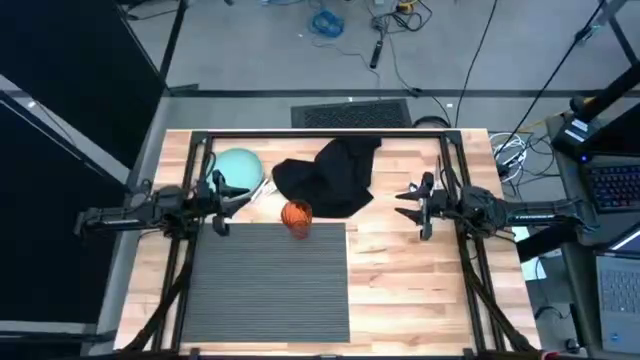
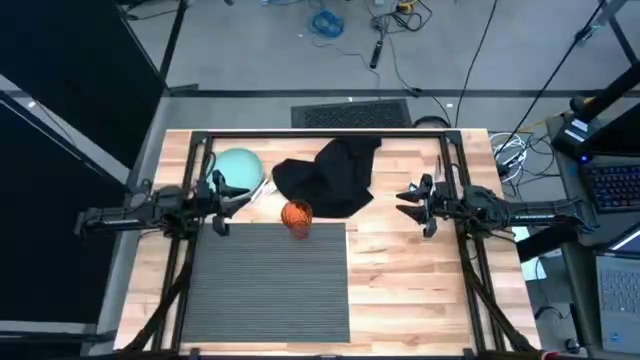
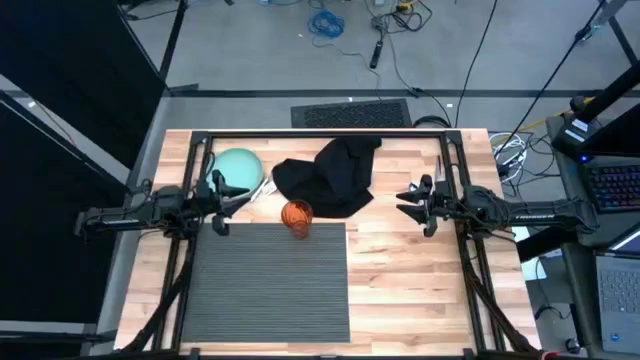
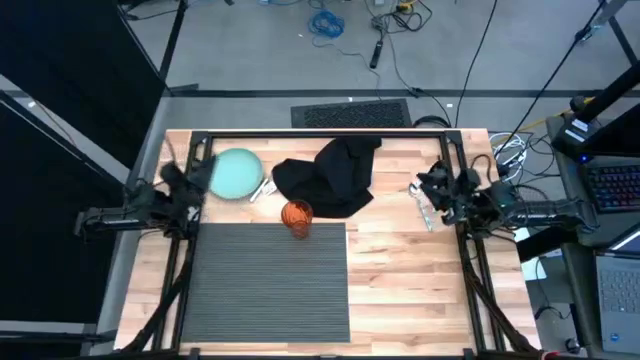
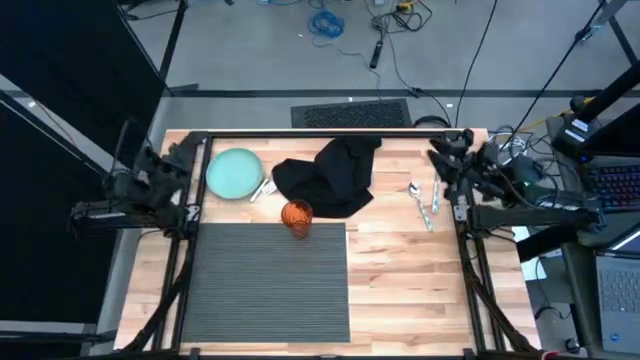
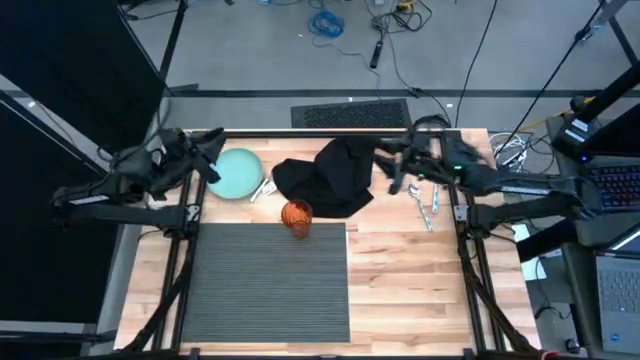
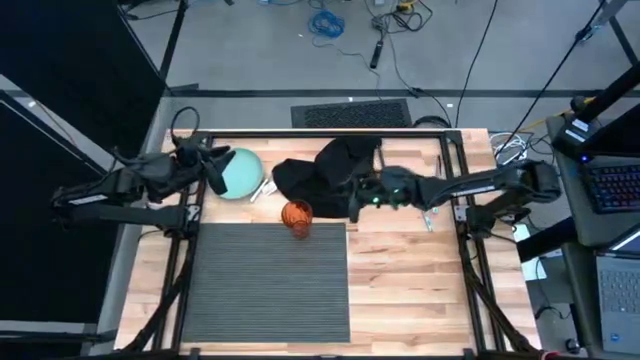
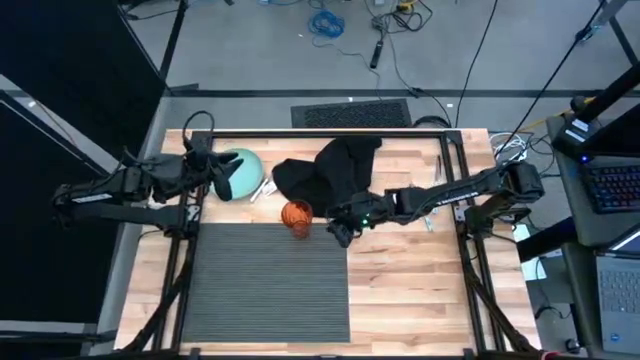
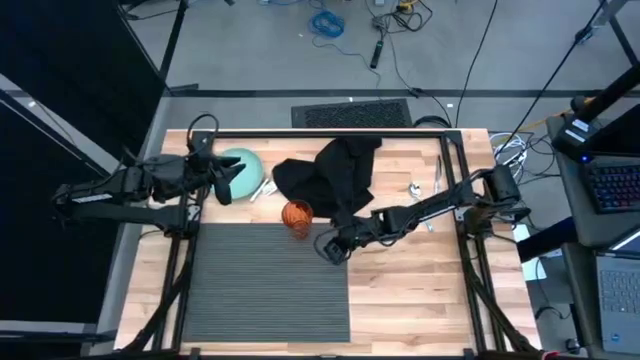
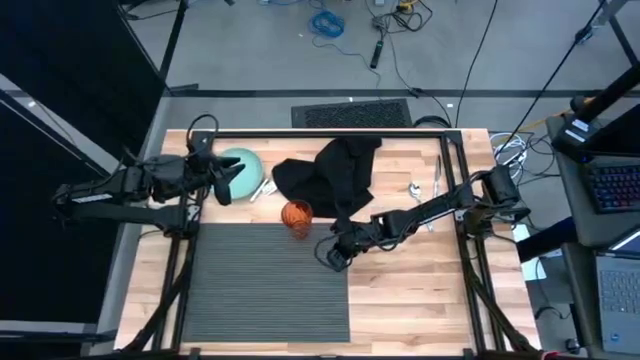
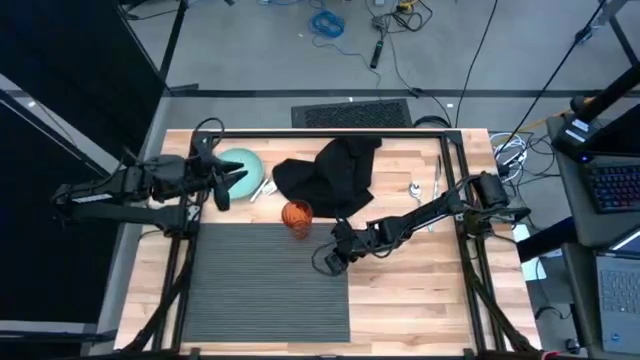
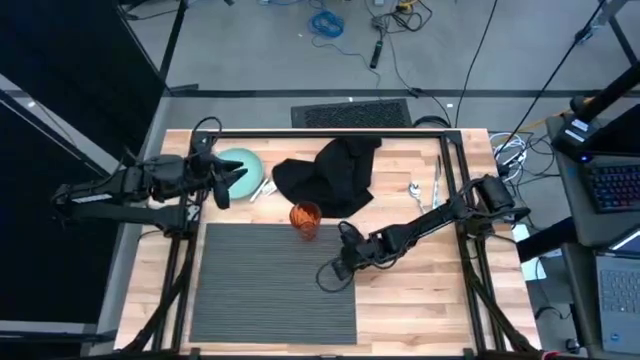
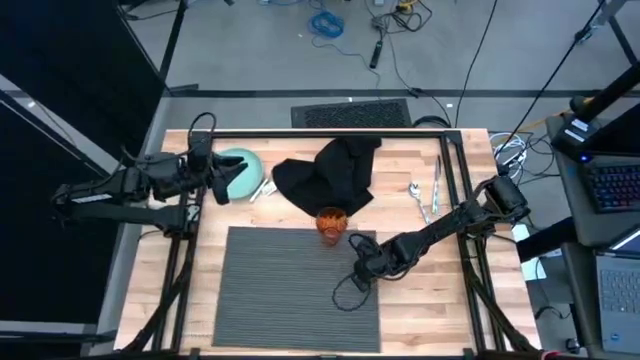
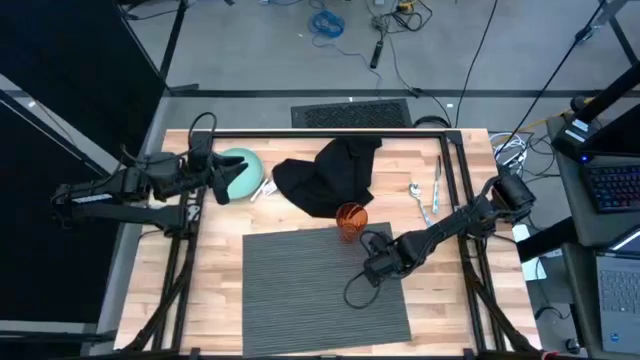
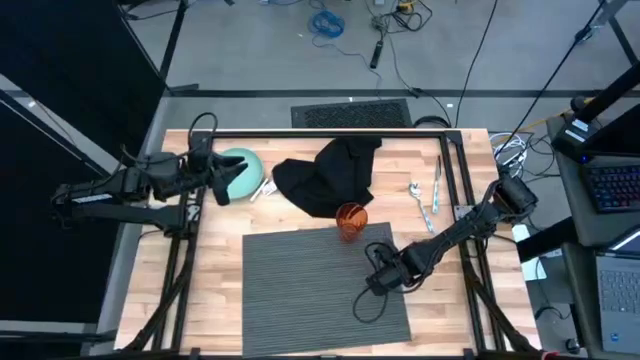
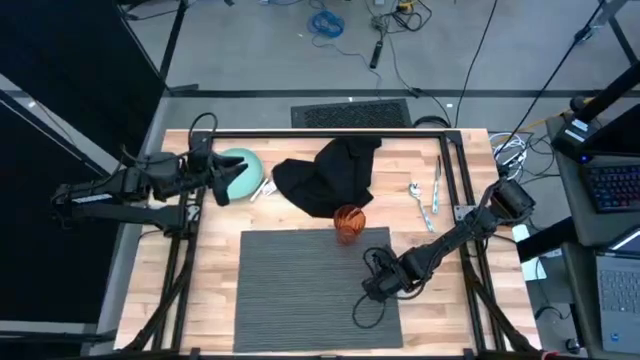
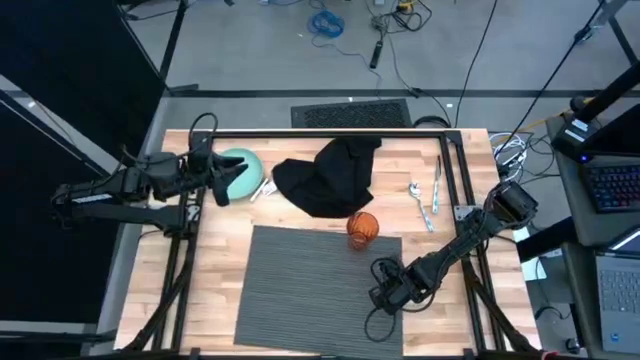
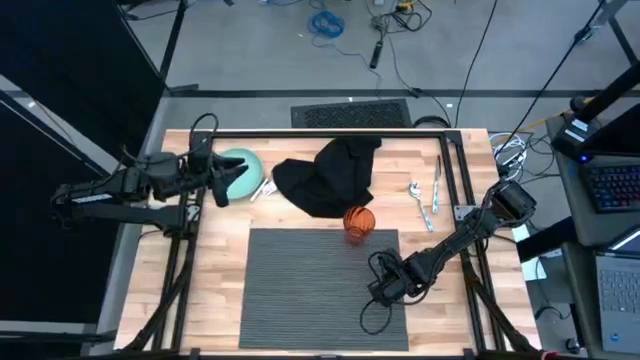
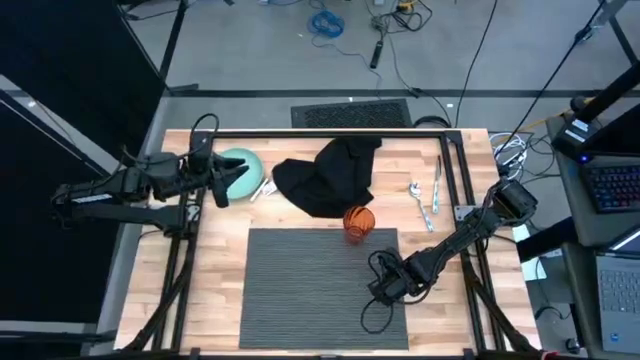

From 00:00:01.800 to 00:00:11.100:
Task: Set table place
Move the gray mat to the center of the table

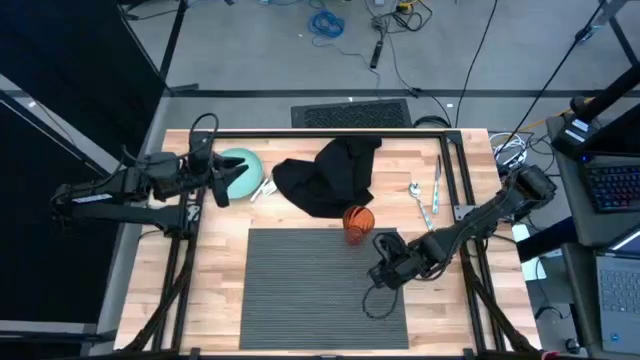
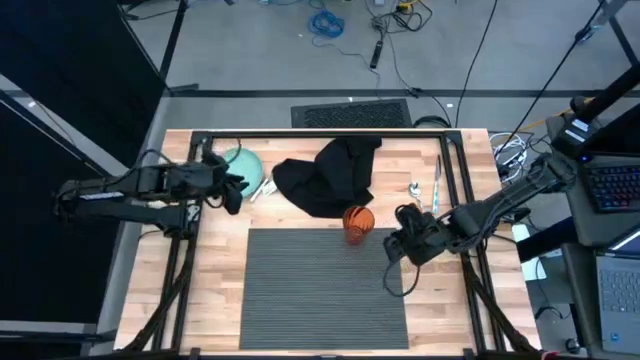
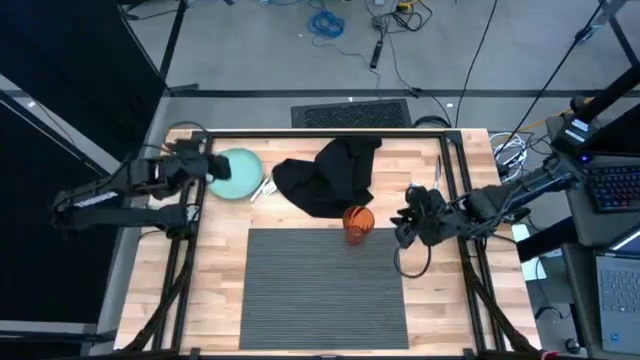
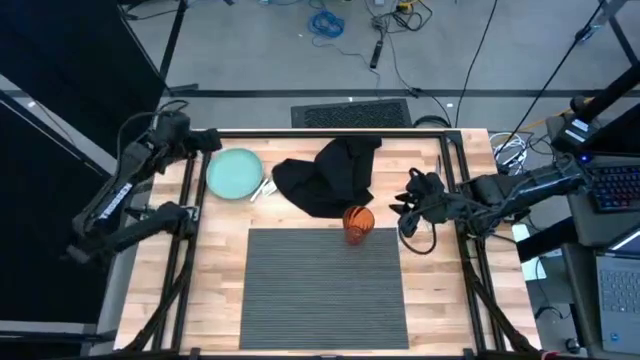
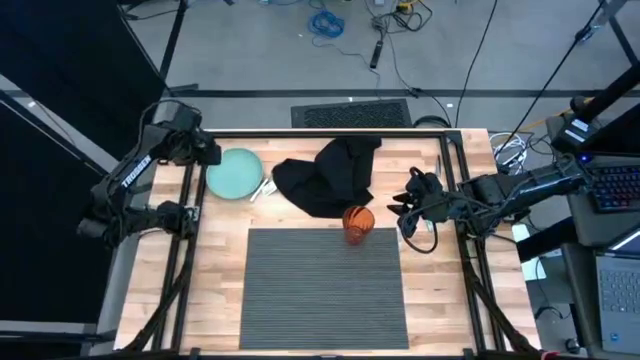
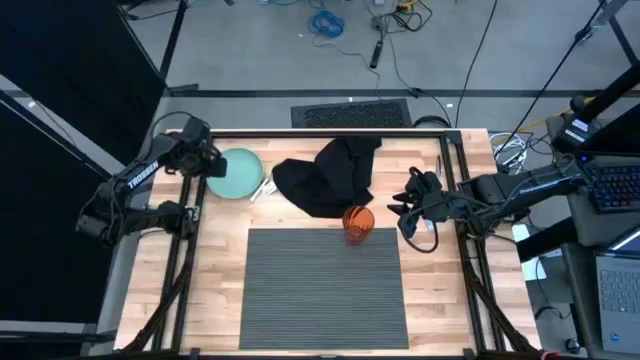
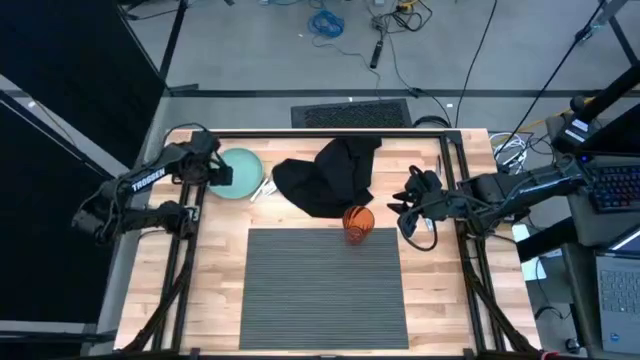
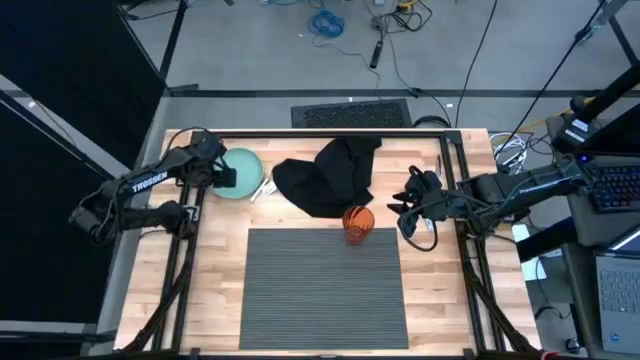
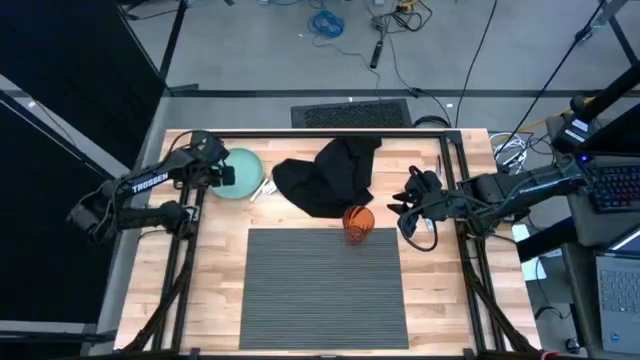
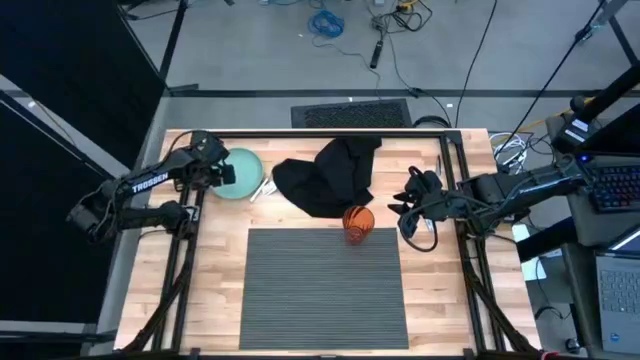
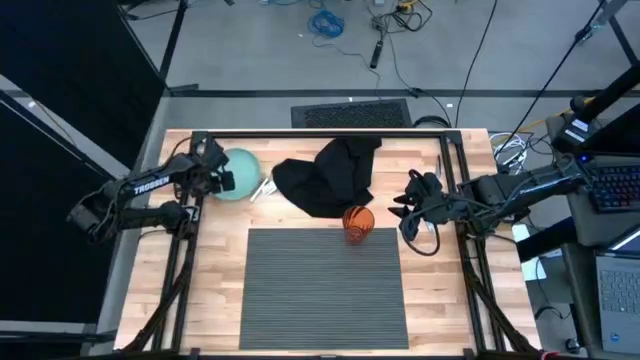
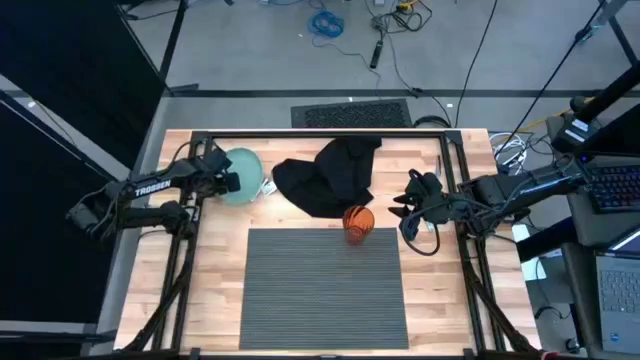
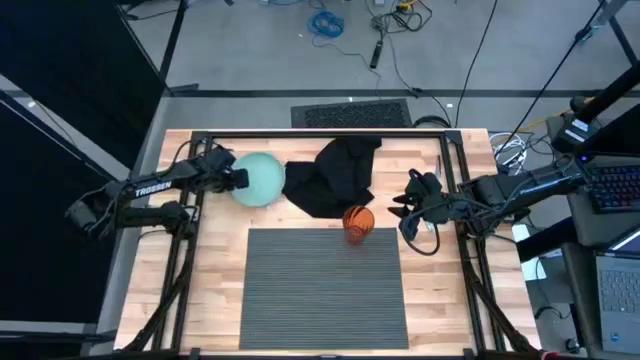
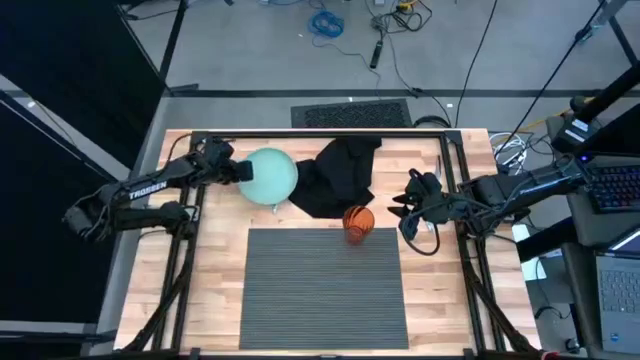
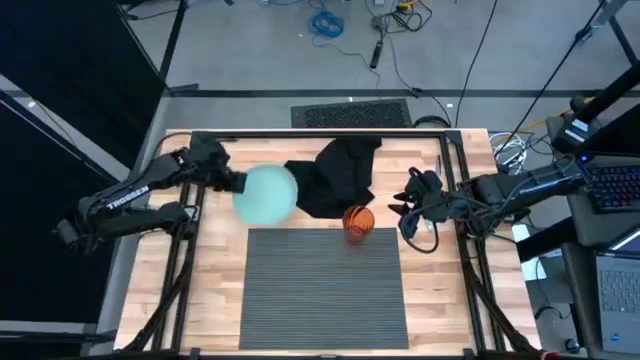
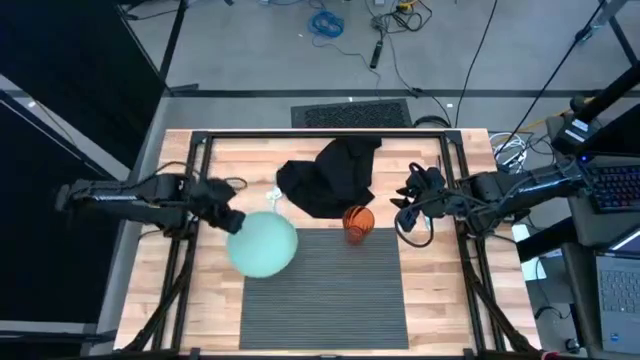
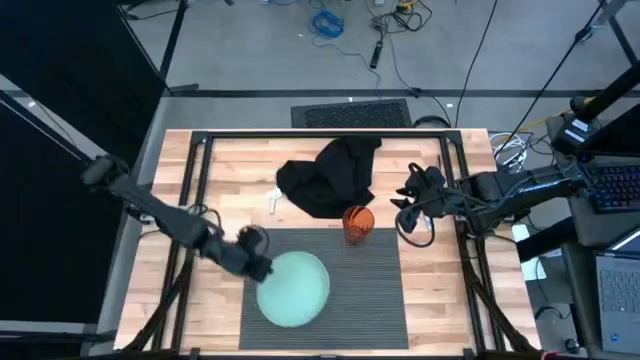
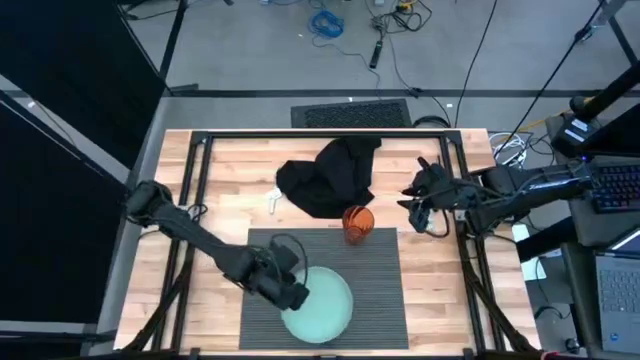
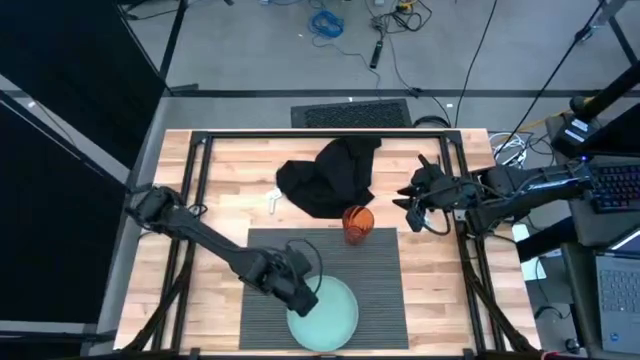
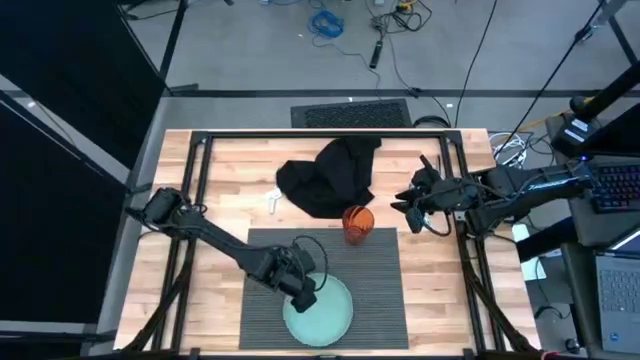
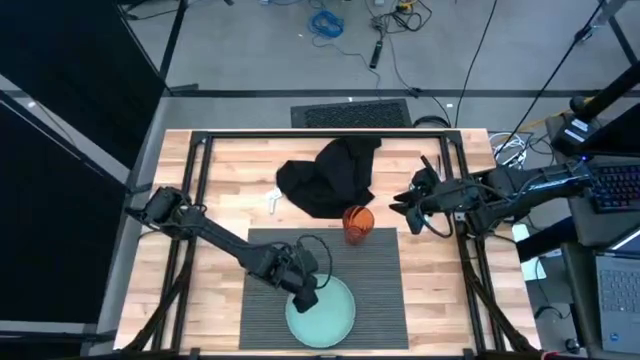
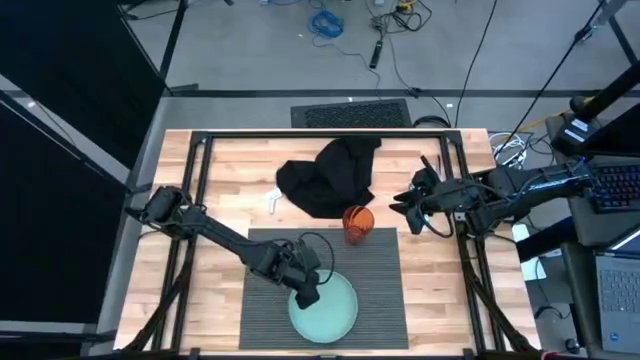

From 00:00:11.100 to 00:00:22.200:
Put the green plate on the bottom center of the gray mat

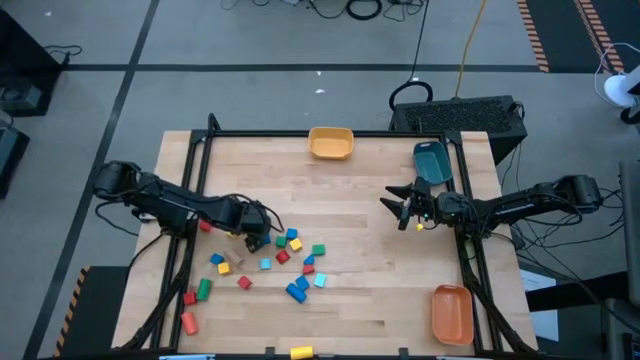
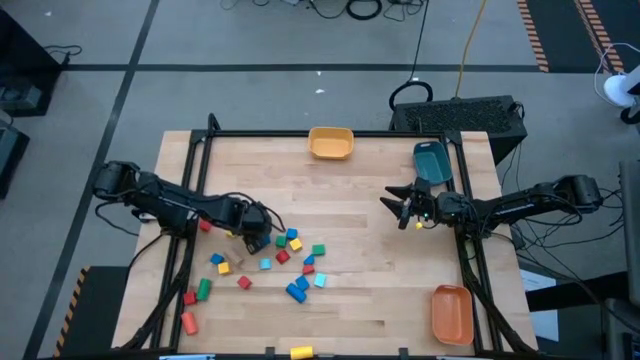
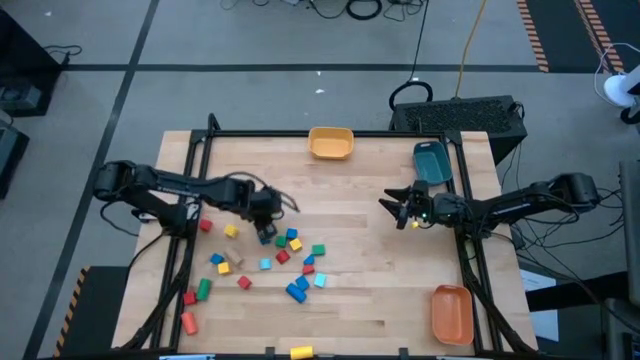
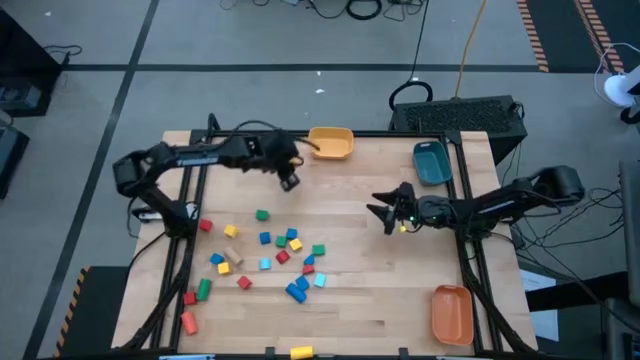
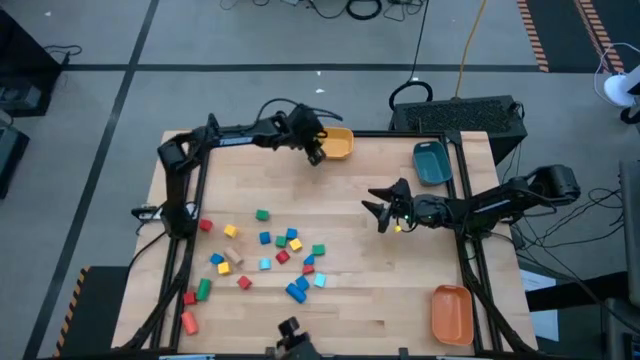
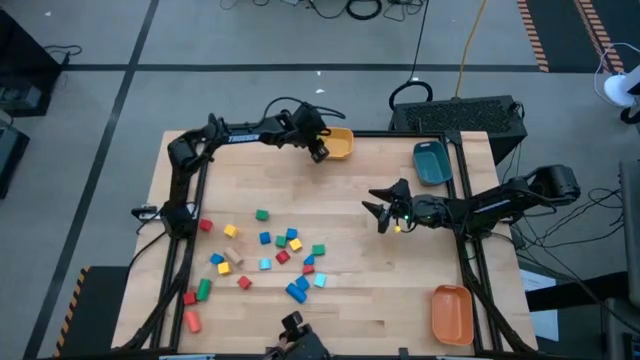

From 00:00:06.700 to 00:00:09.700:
Task: Sort blocks by size
Put the yellow square block into the yellow bin
